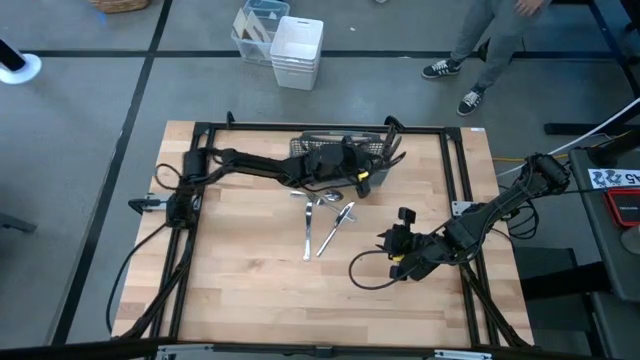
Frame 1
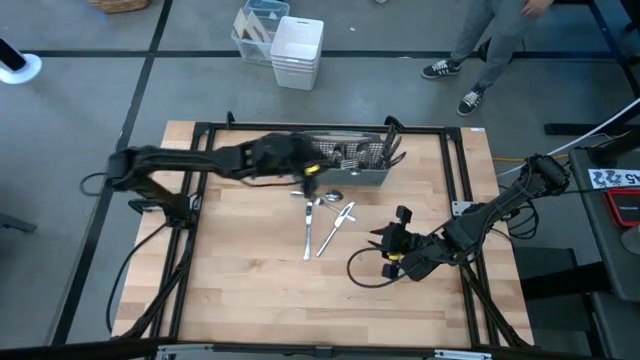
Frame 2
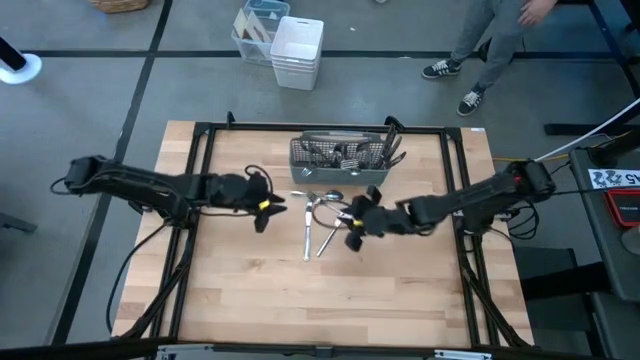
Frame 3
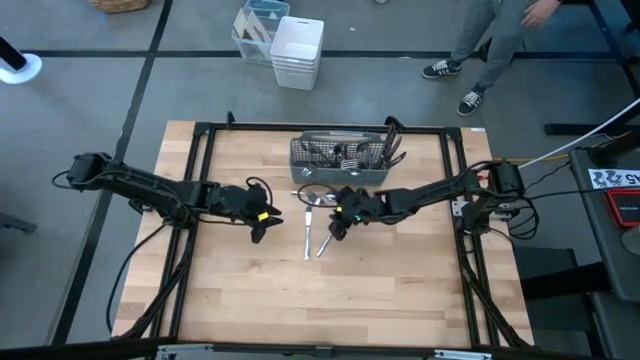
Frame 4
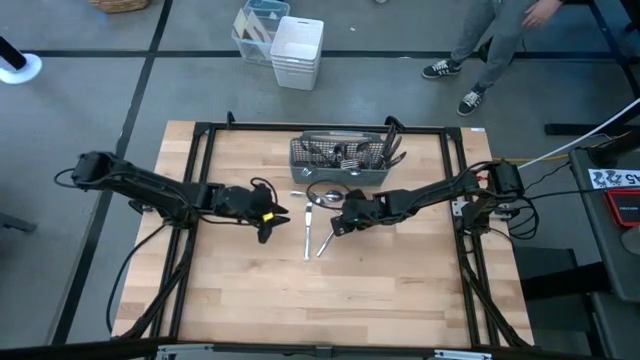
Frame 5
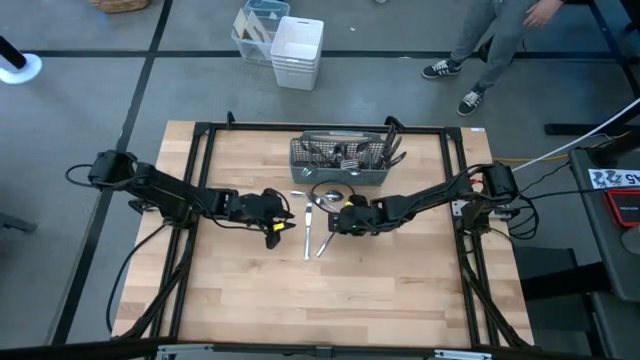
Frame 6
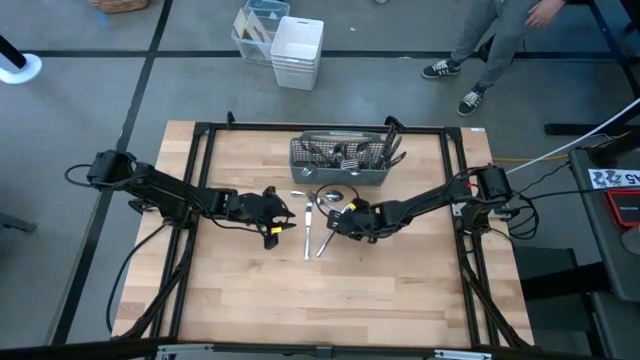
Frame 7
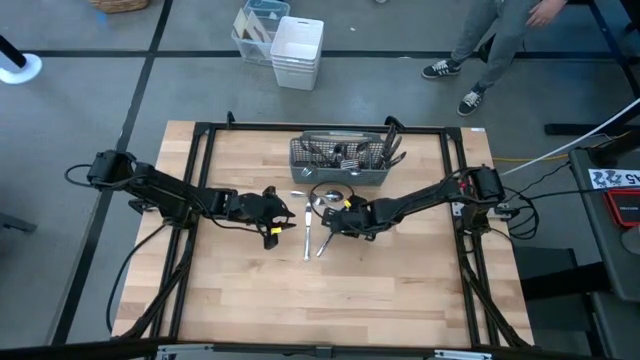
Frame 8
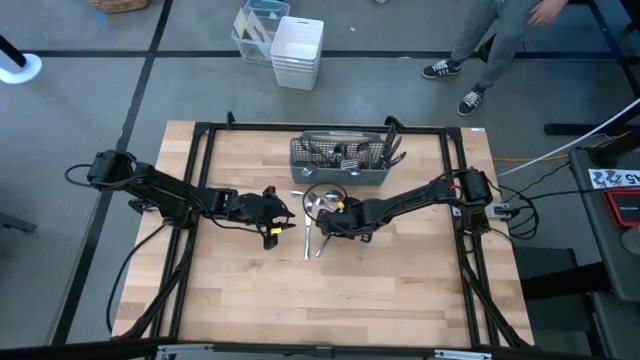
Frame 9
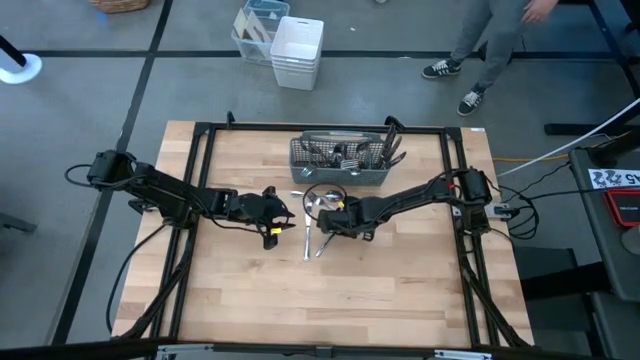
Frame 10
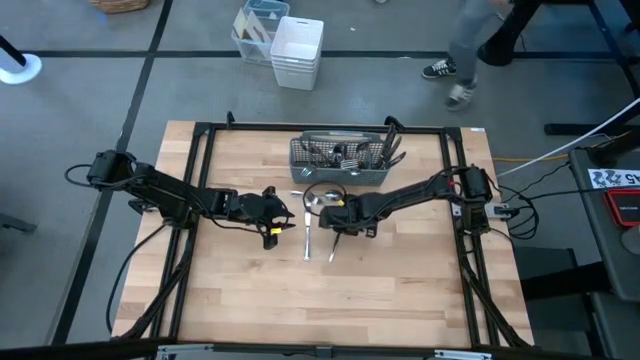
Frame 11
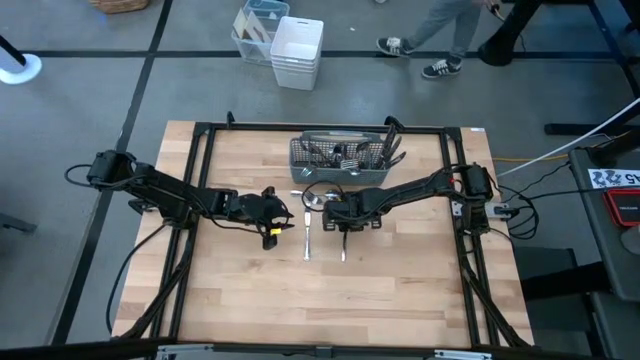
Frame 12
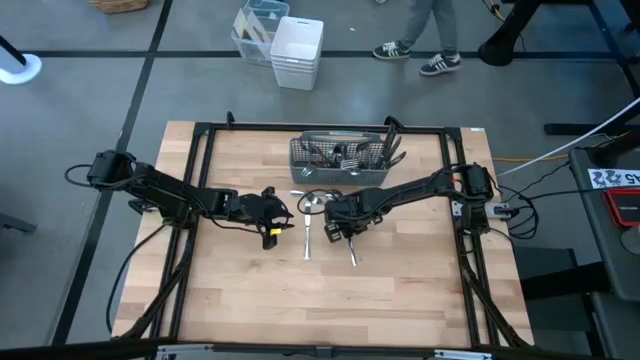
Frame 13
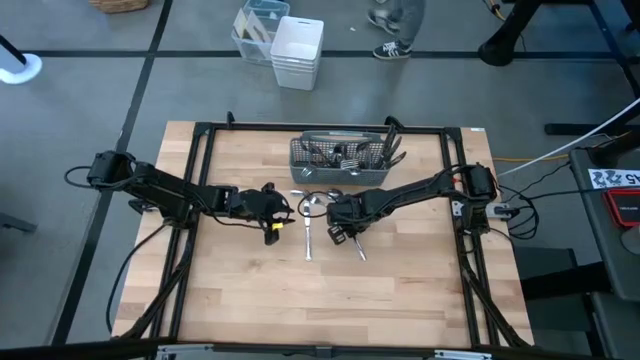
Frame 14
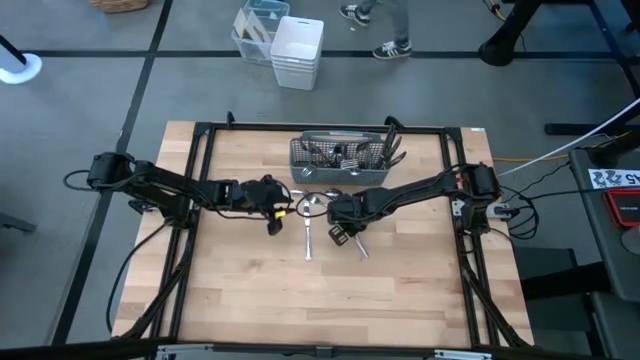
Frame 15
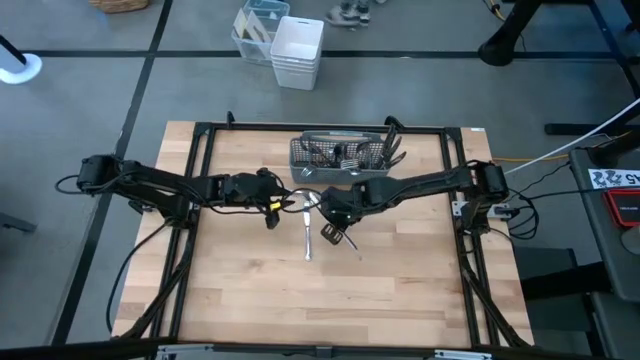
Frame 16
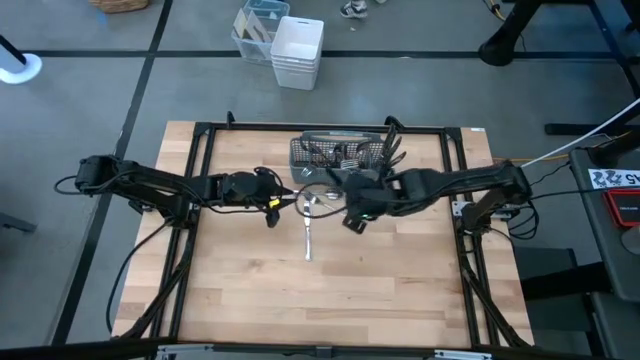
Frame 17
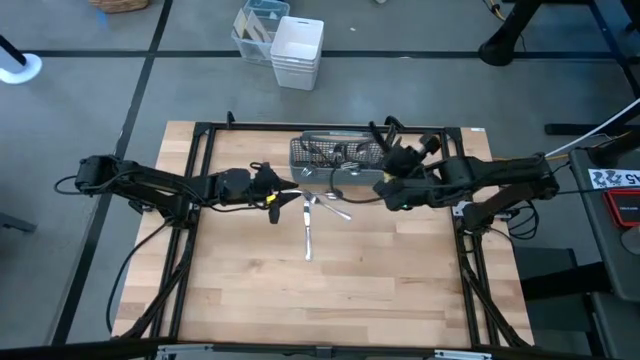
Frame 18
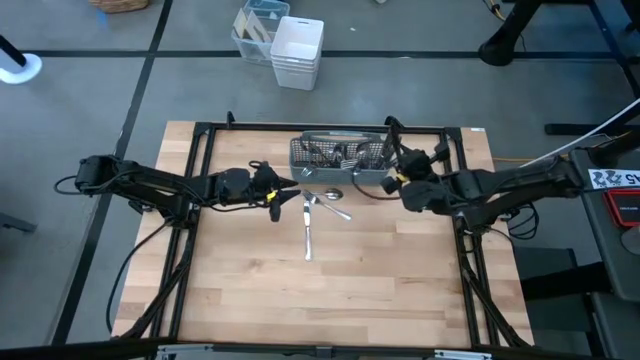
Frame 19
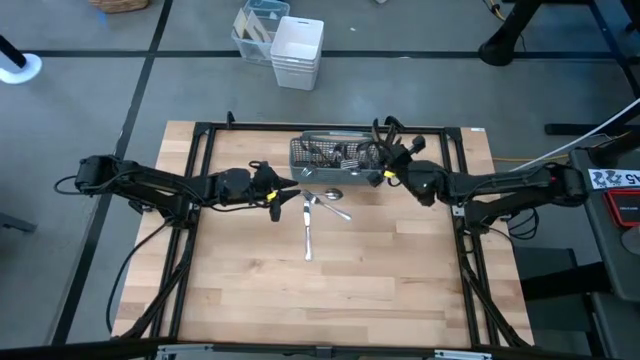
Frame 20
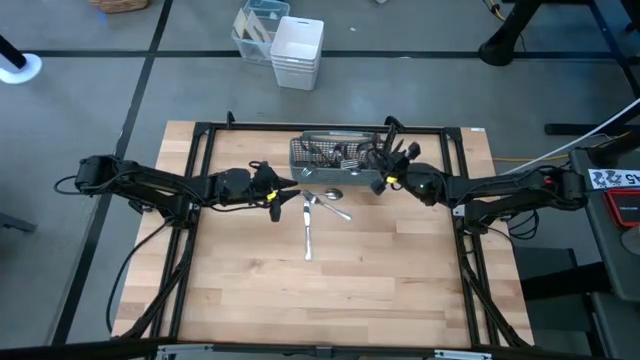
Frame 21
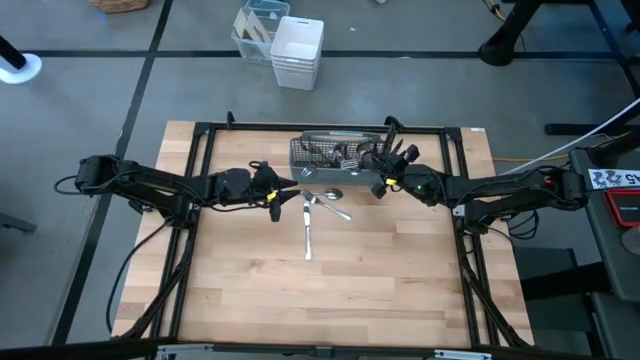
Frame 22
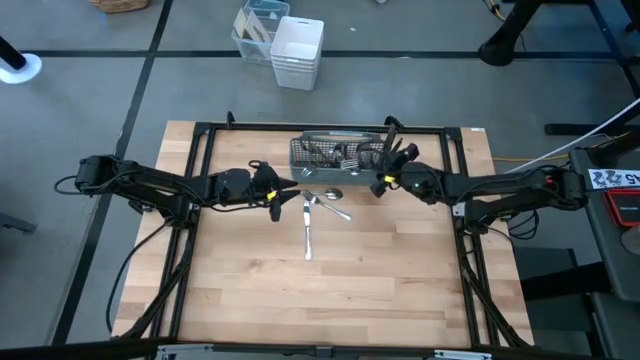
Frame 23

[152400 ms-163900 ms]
Task: Sort silverware
Put the knife into the silverware rack

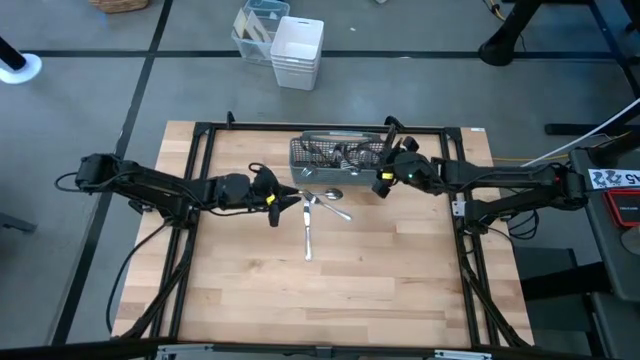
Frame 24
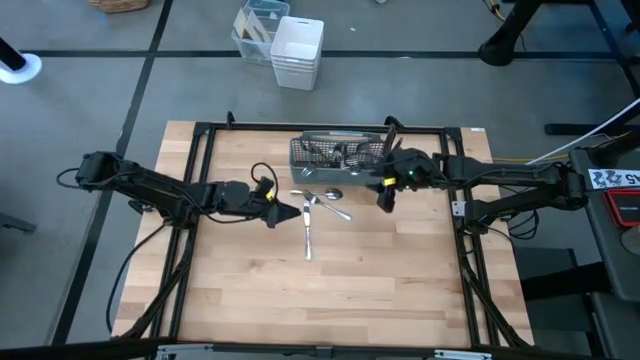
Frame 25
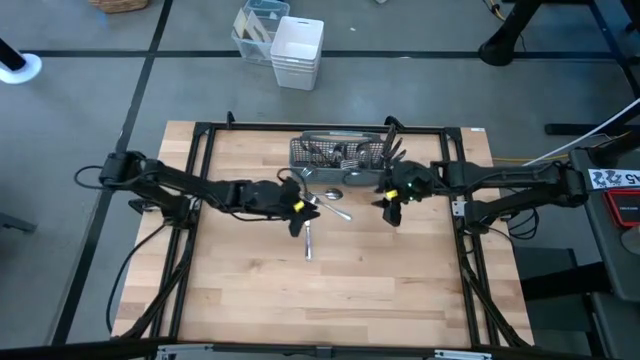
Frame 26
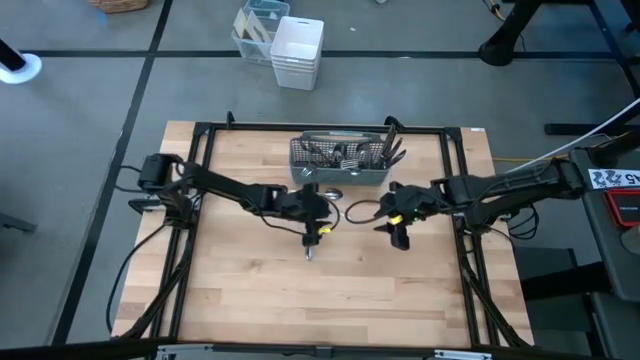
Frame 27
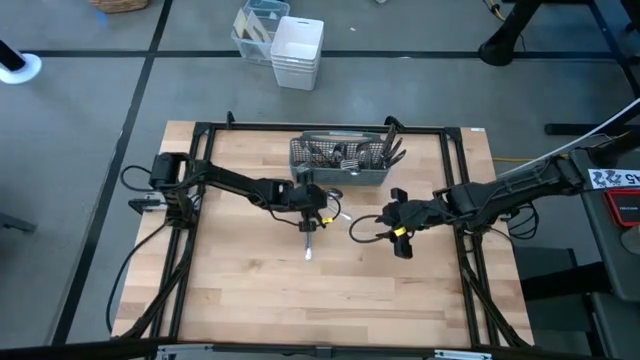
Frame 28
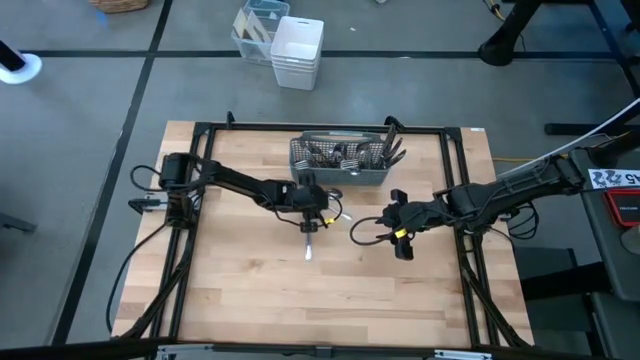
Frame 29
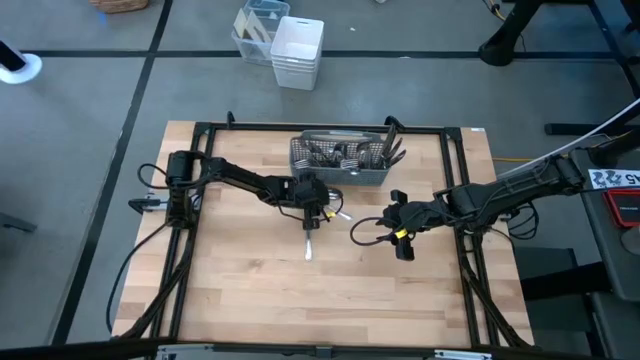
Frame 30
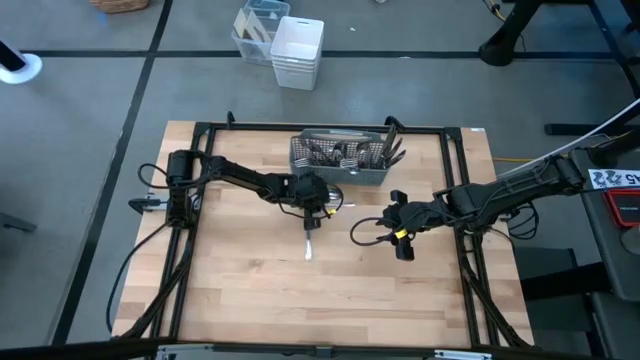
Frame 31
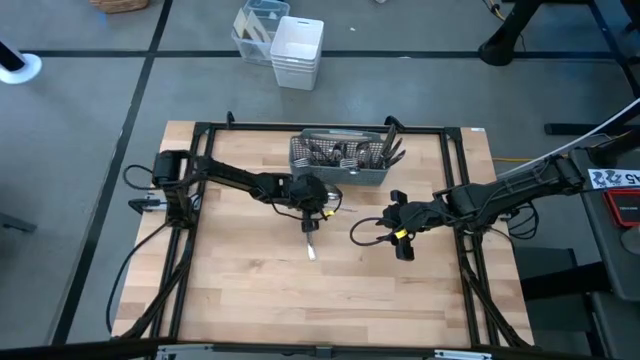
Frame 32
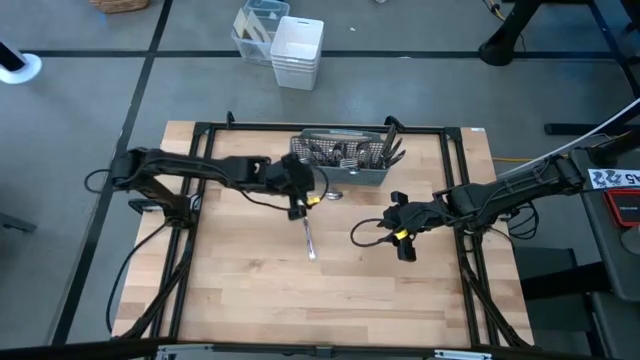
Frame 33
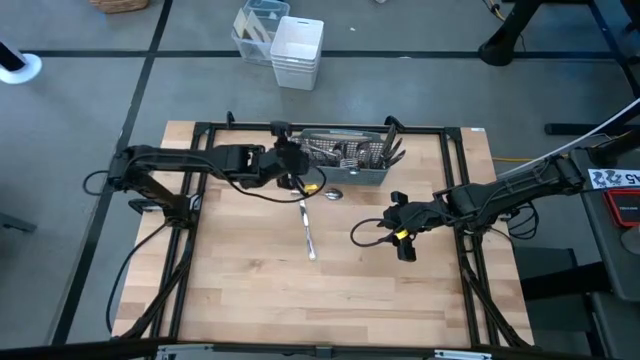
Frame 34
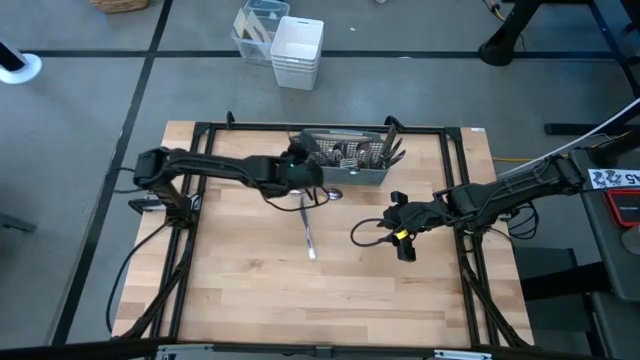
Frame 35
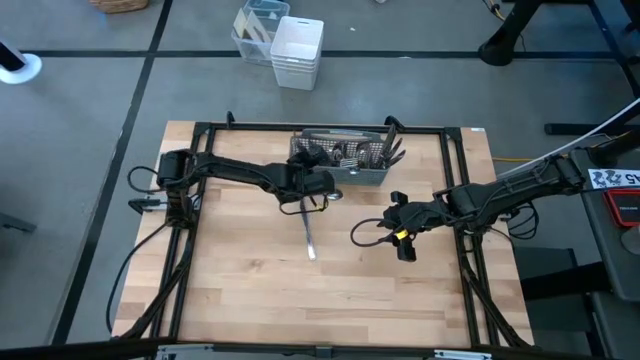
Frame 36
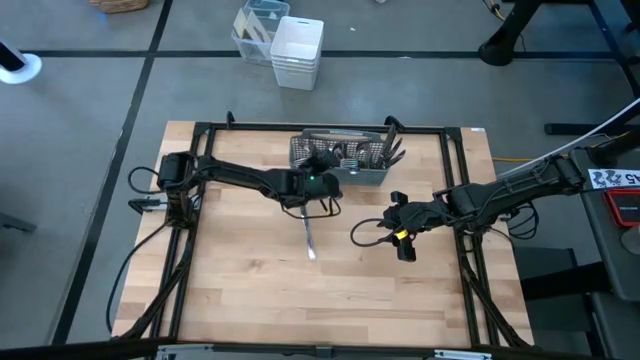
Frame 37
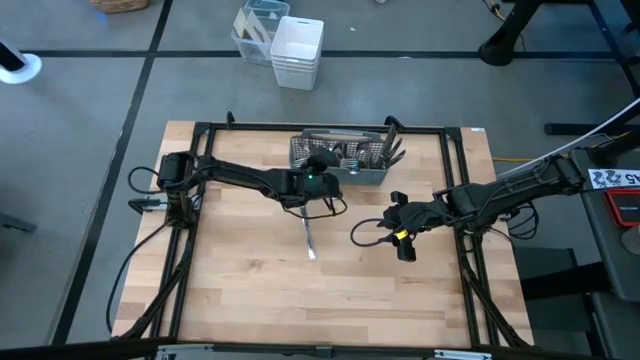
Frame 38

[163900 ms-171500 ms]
Put the fork into the silverware rack

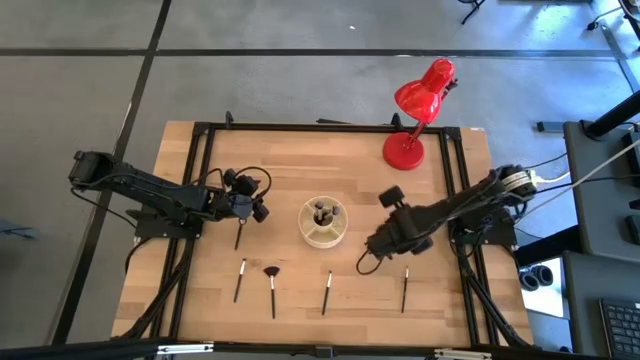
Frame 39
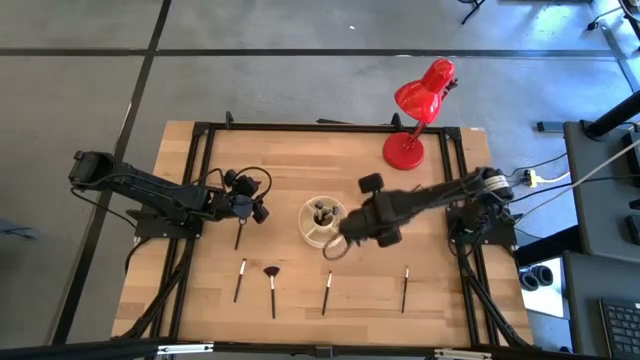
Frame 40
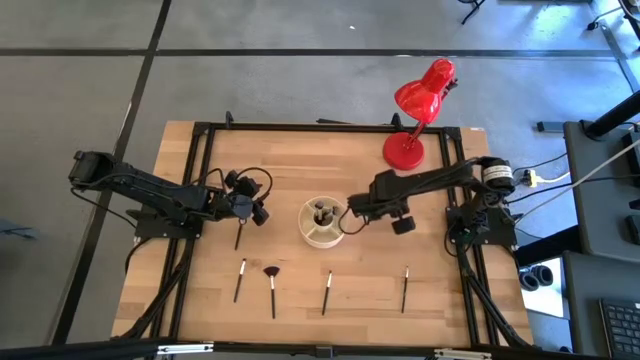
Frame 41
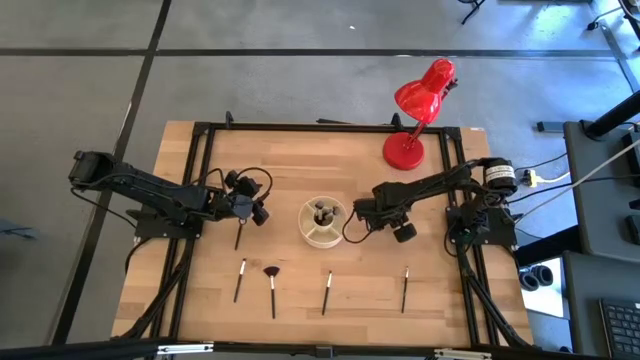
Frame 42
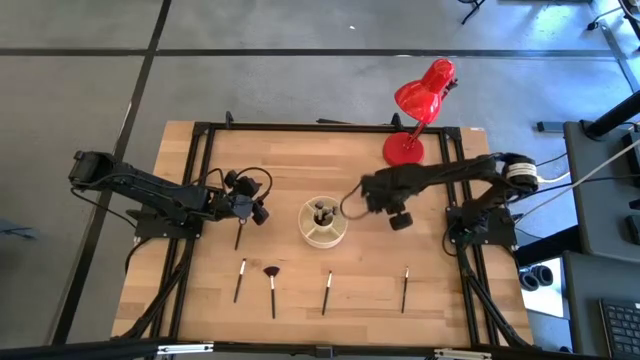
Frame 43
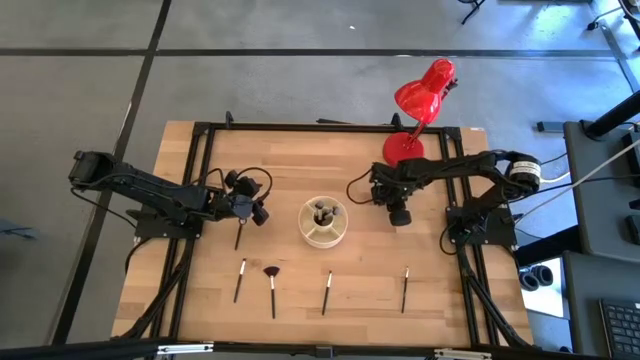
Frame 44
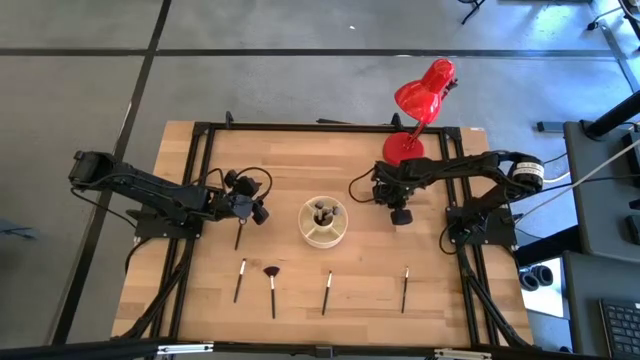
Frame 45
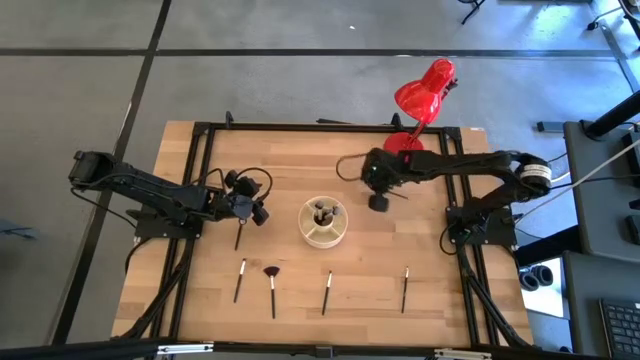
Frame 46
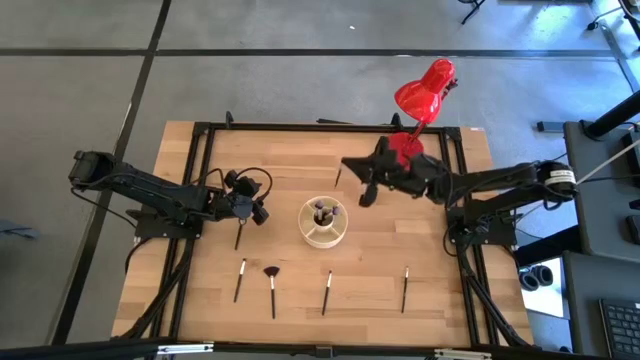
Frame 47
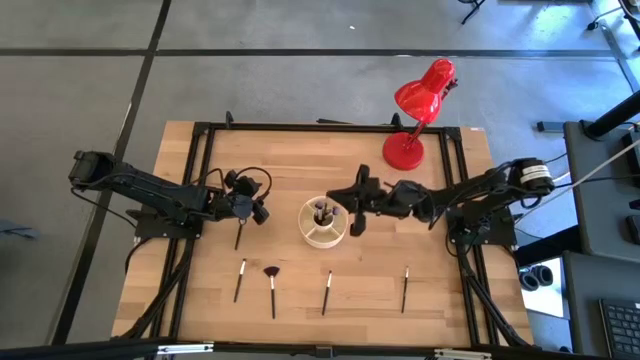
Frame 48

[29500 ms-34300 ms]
Task: Put items in baskets/containers
Put the black eyeshadow brush into the white brush holder
